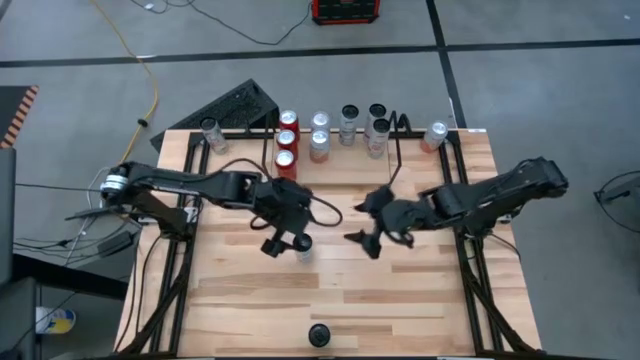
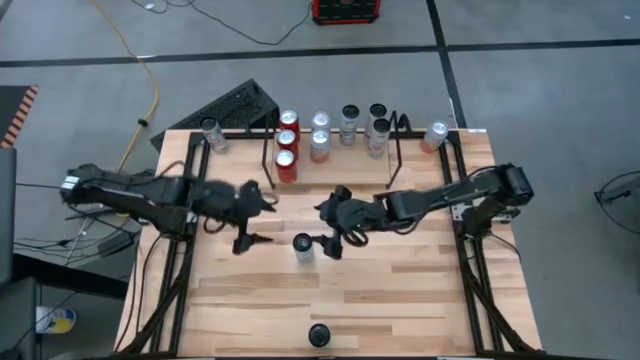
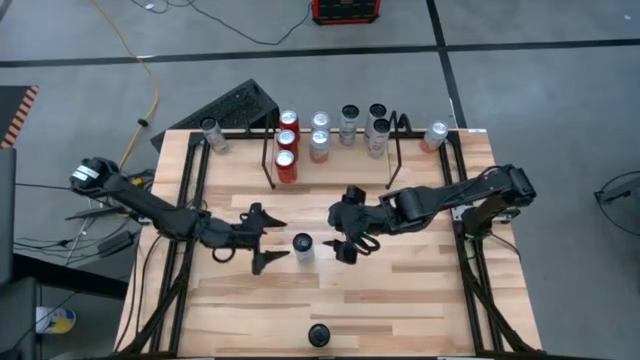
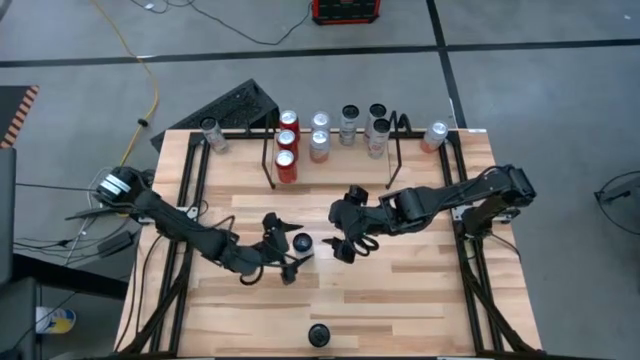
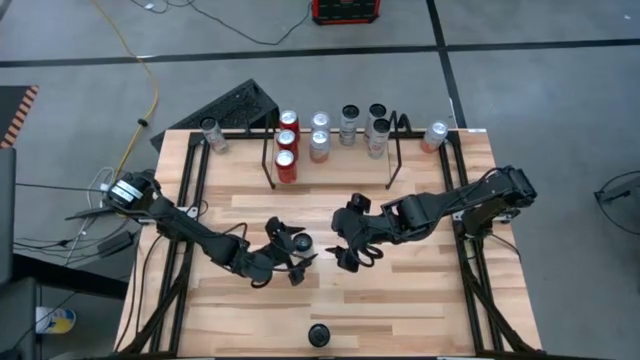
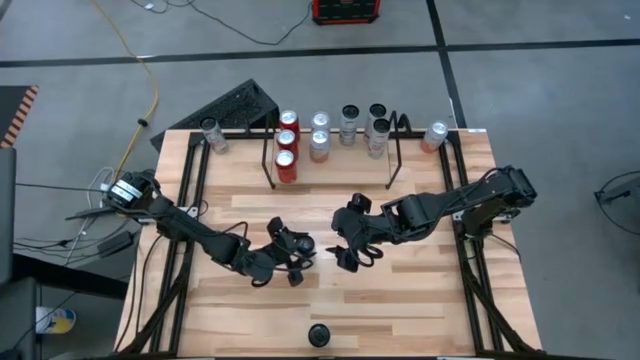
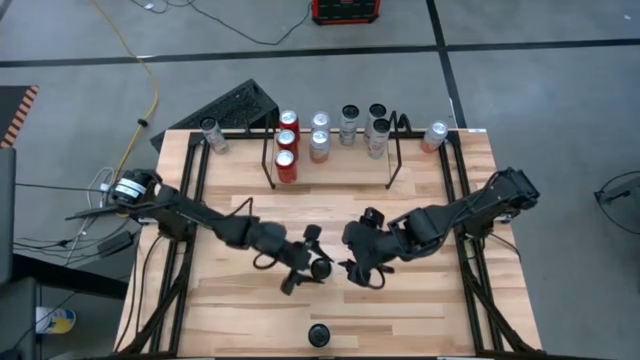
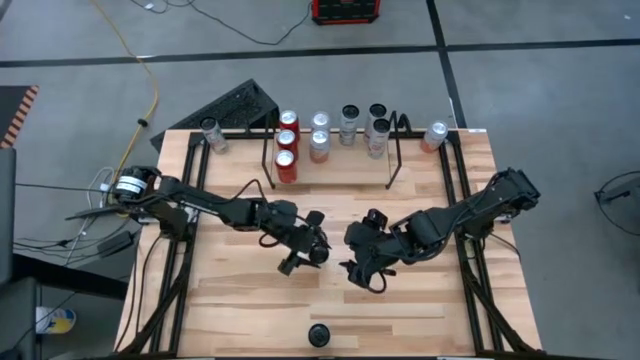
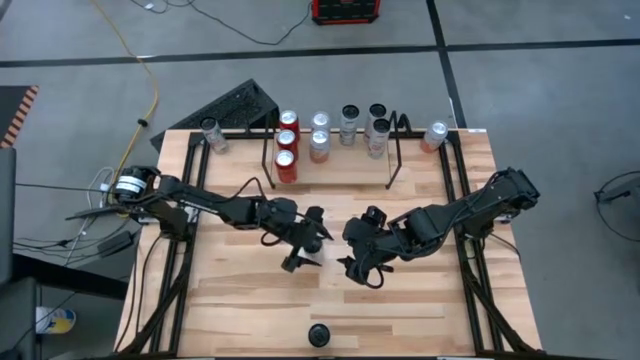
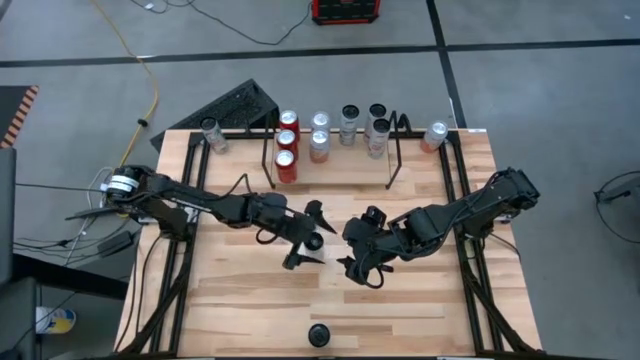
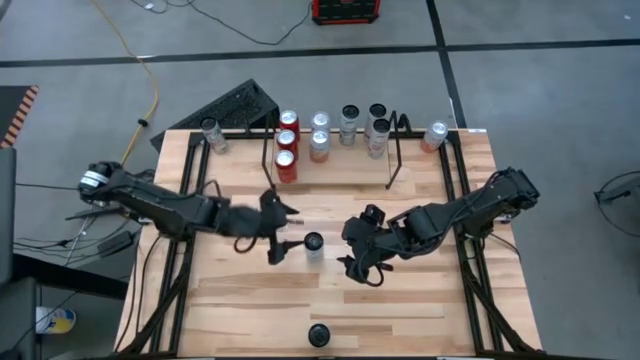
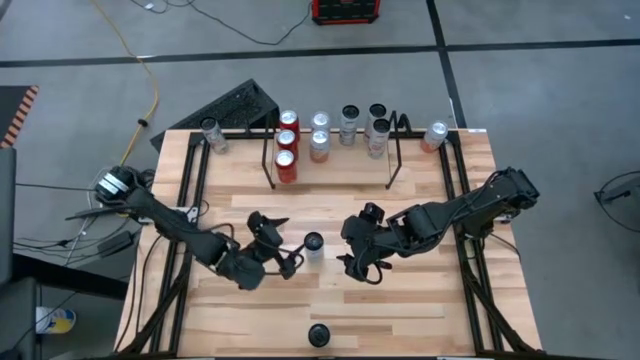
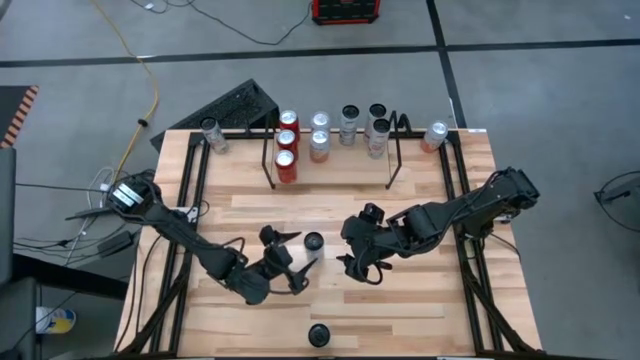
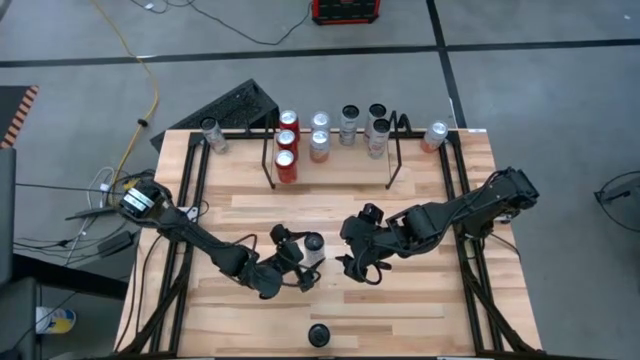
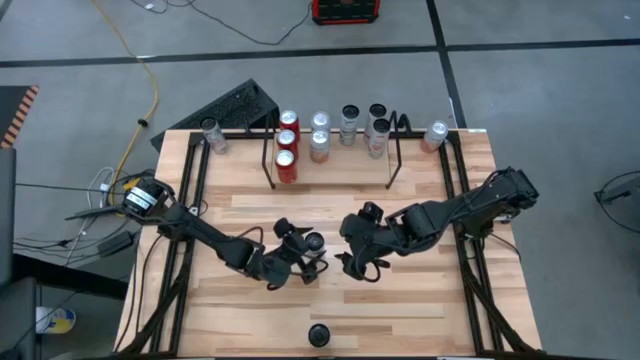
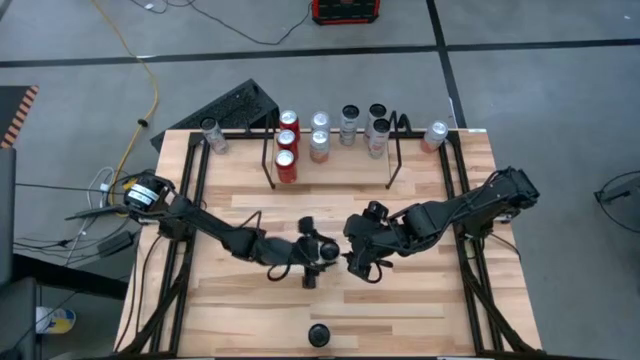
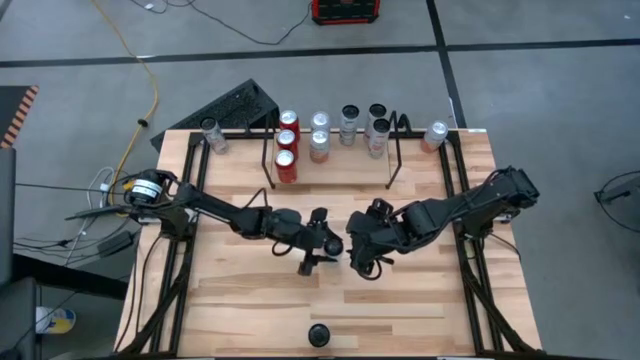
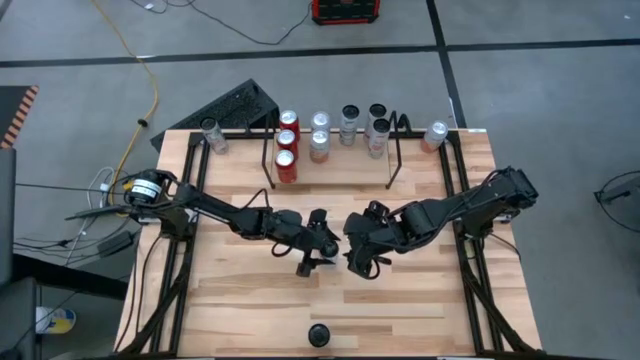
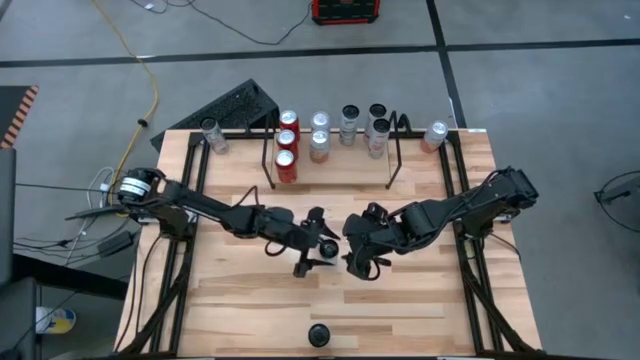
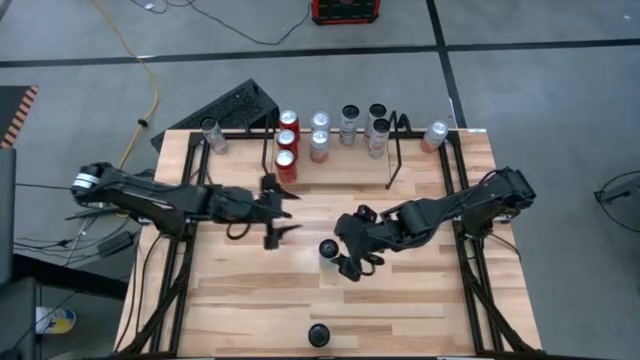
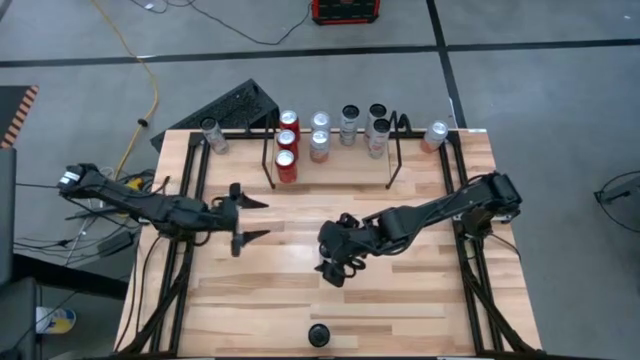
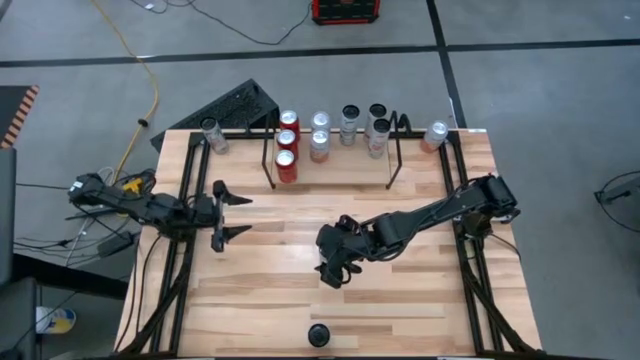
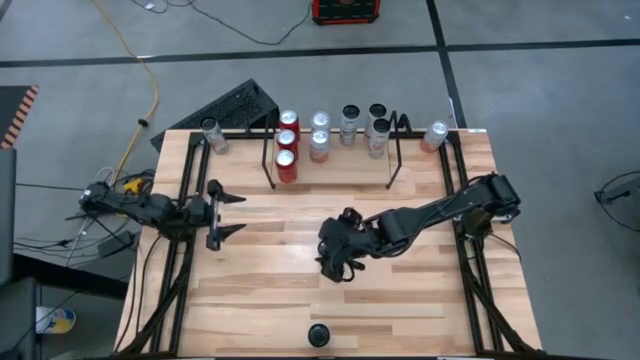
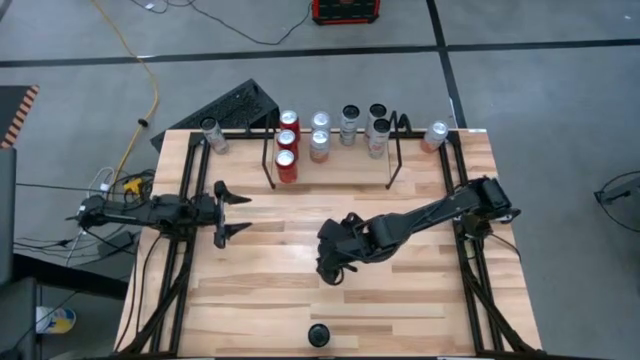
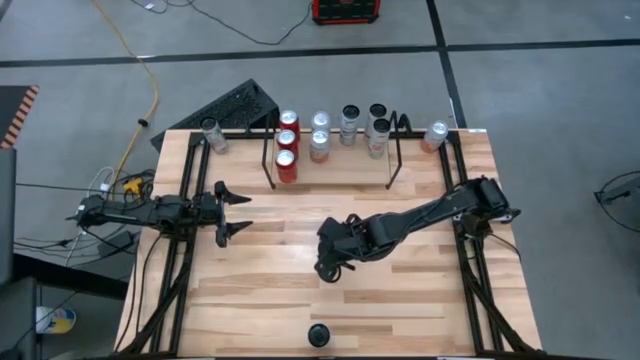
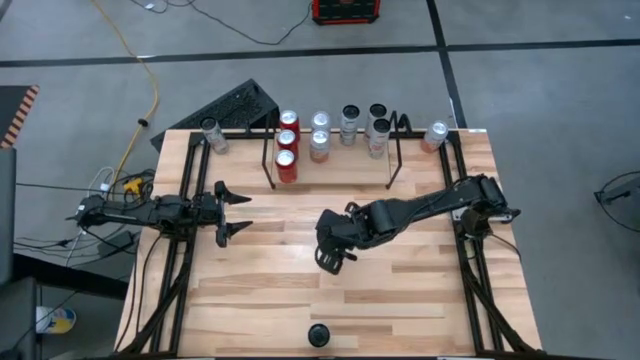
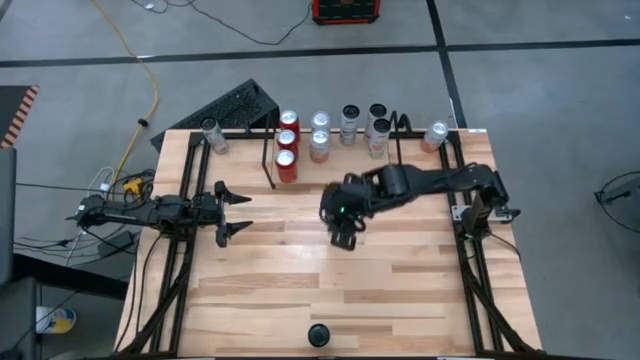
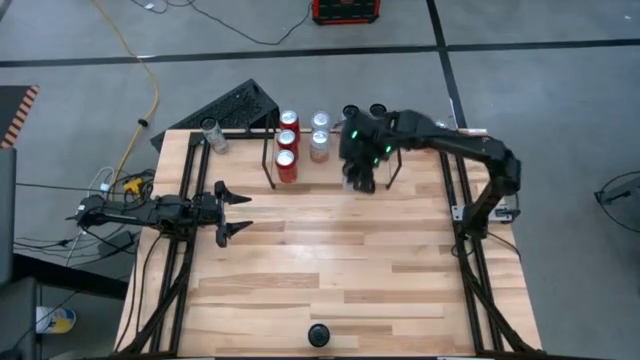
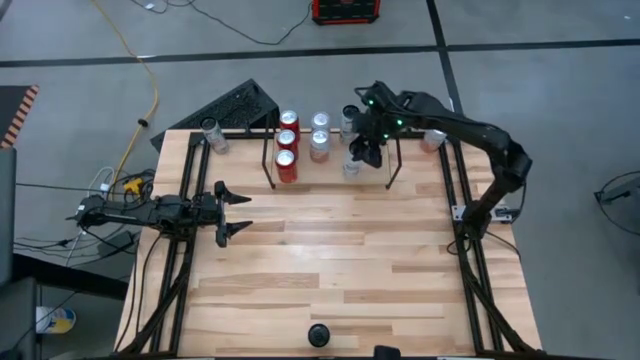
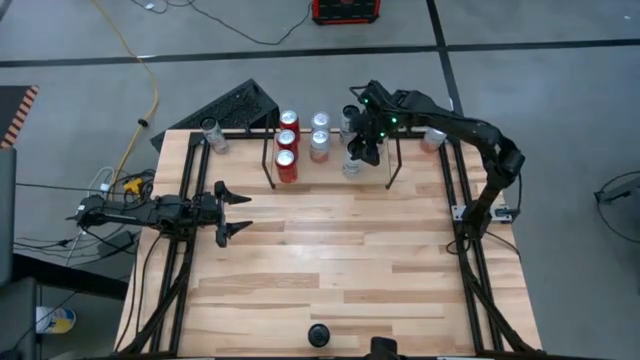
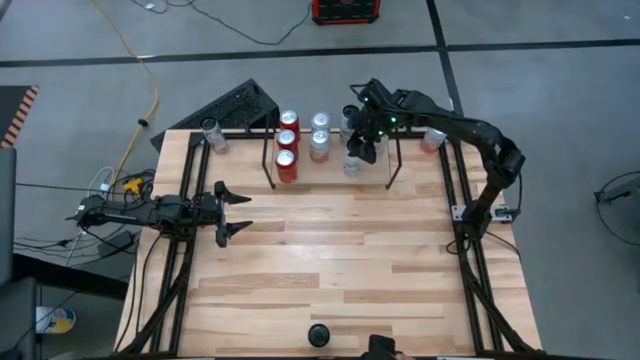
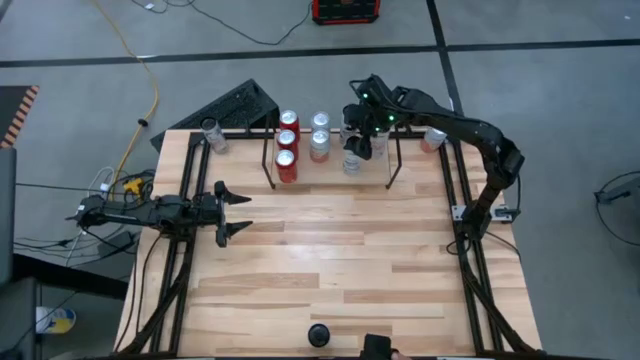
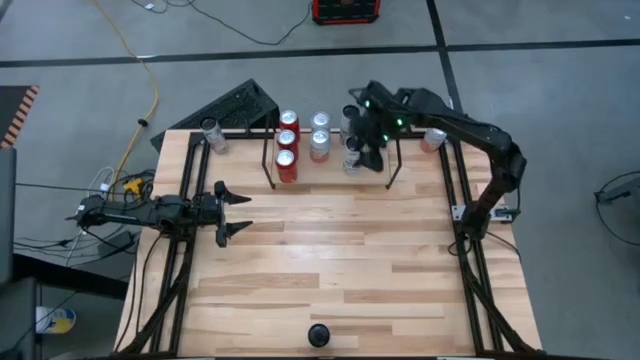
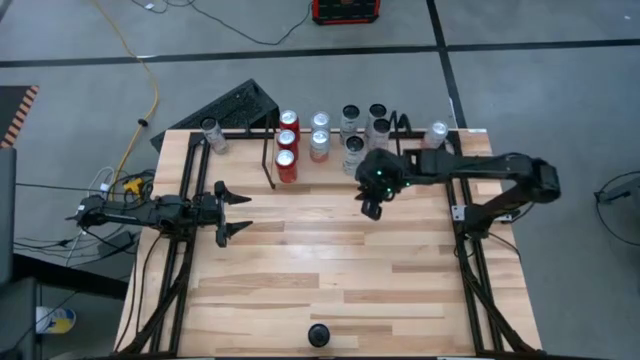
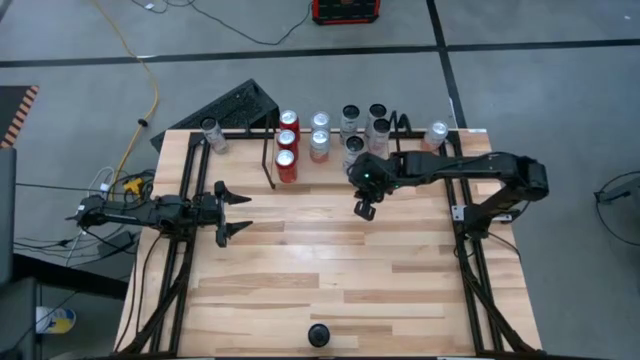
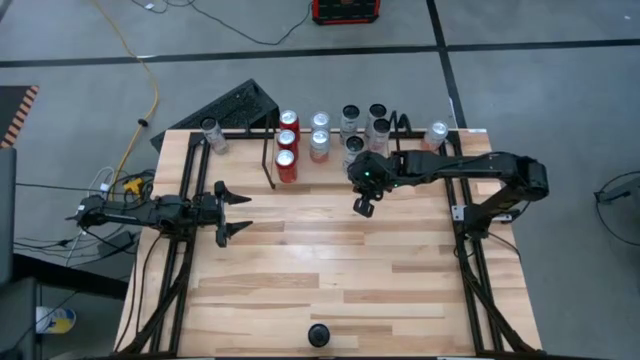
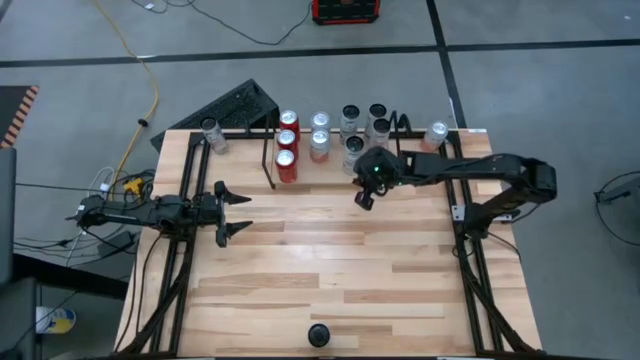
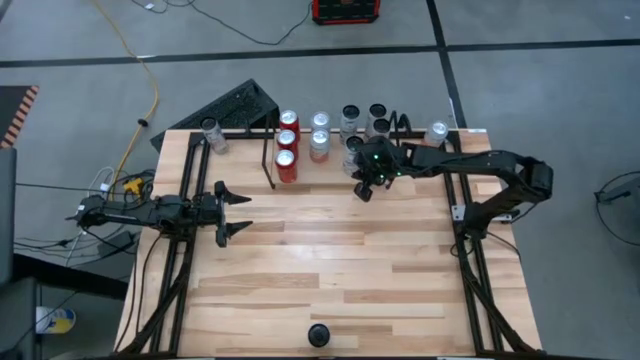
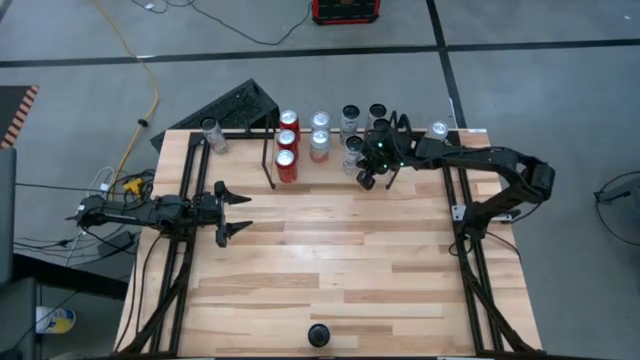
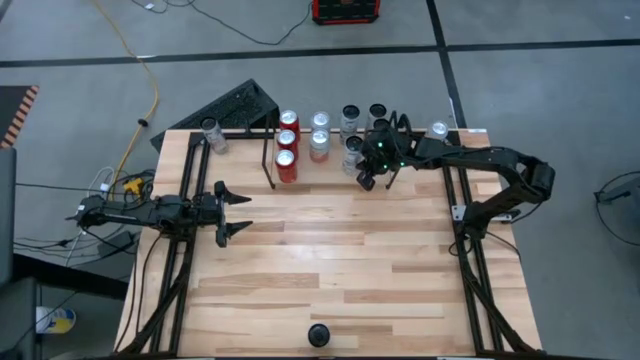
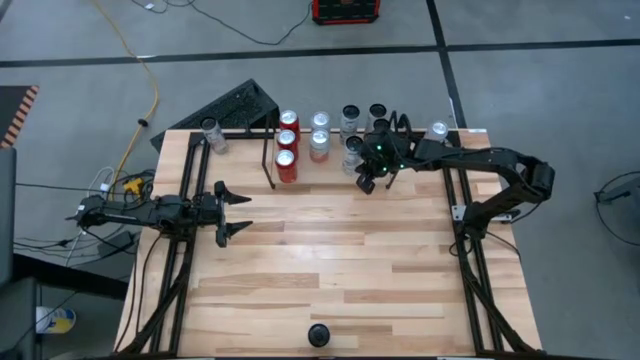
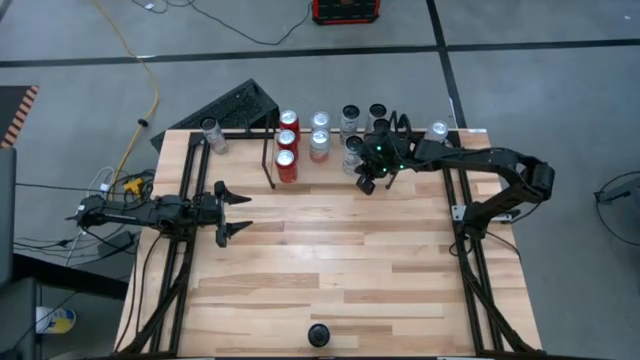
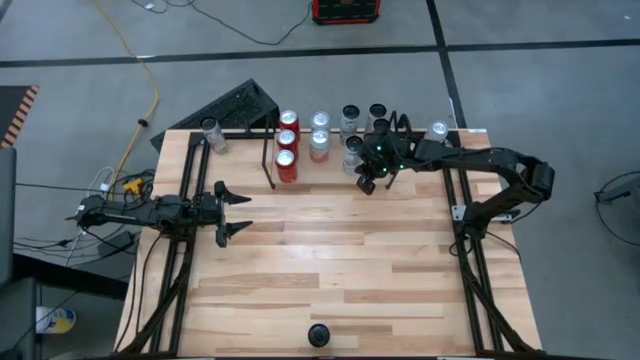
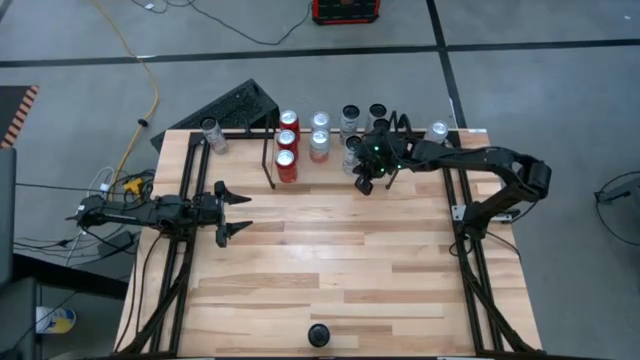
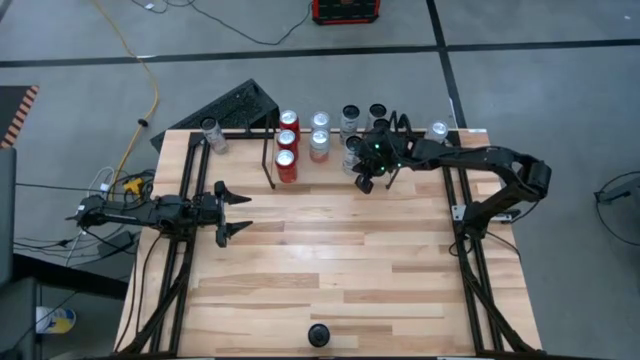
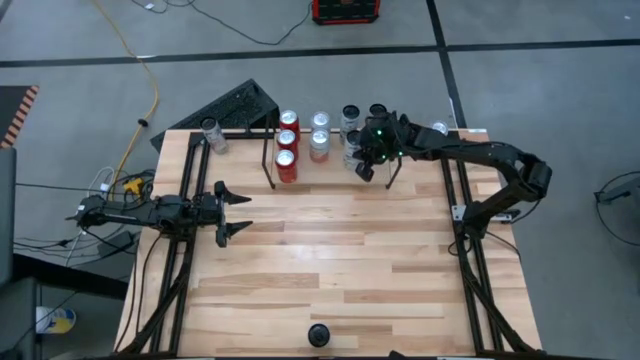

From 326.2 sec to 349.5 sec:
Task: Place canned beverage on shelf
Put the top white blue soda can on the shelf aligned with the other white blue soda can
